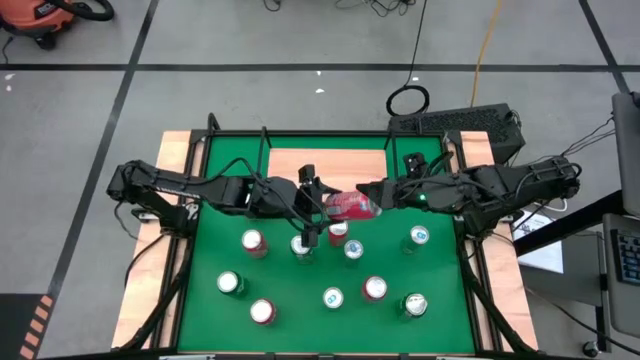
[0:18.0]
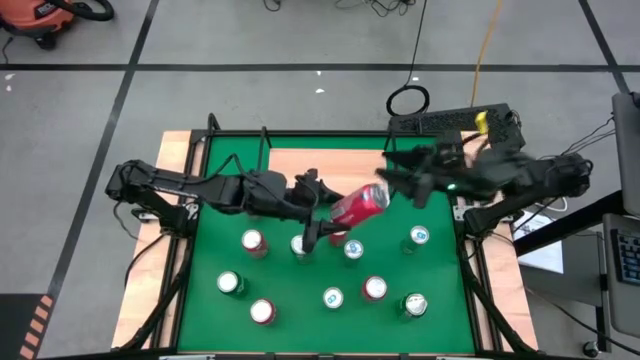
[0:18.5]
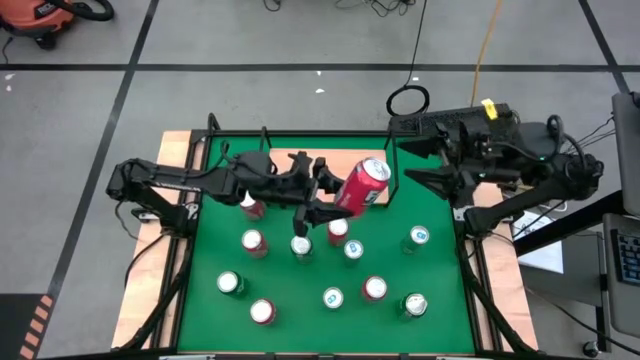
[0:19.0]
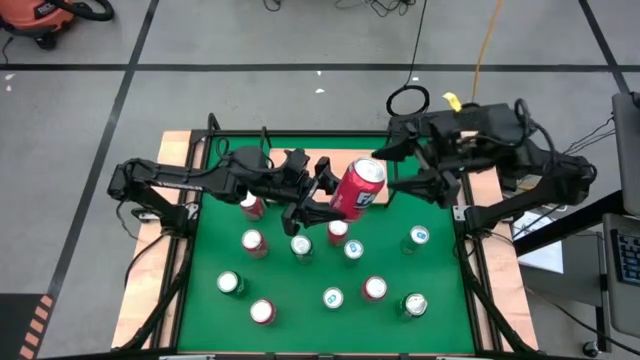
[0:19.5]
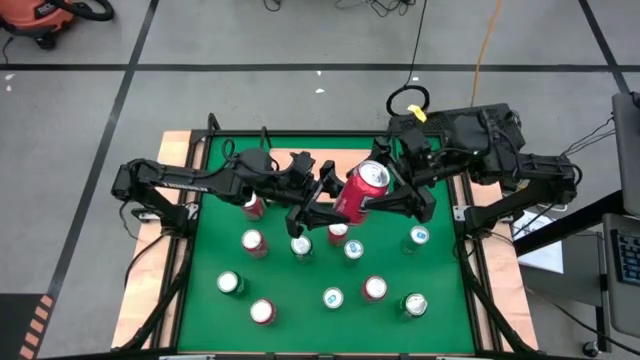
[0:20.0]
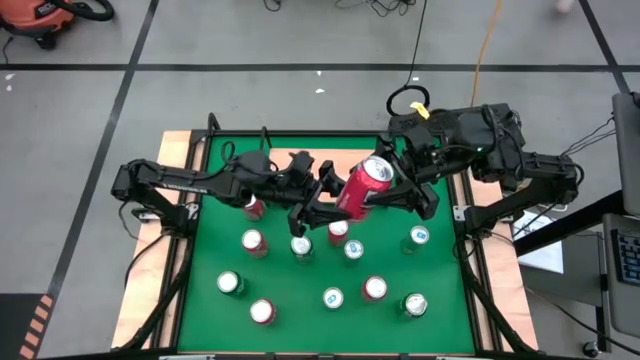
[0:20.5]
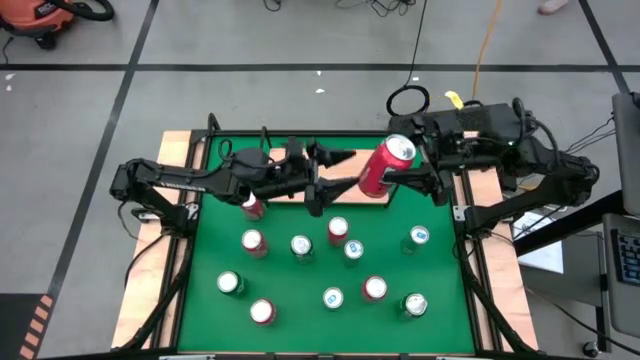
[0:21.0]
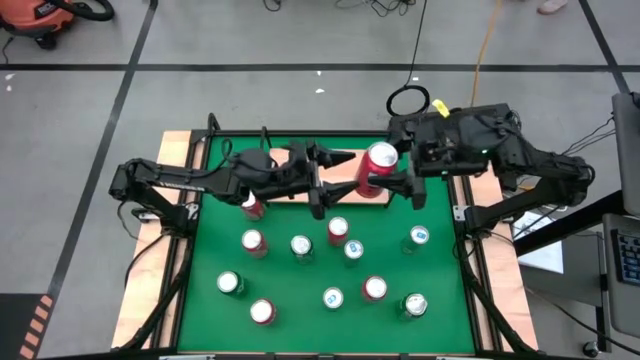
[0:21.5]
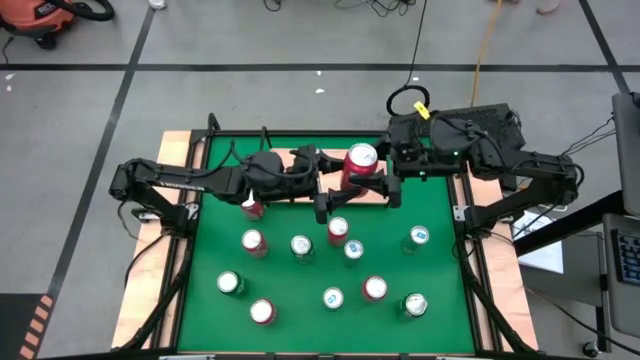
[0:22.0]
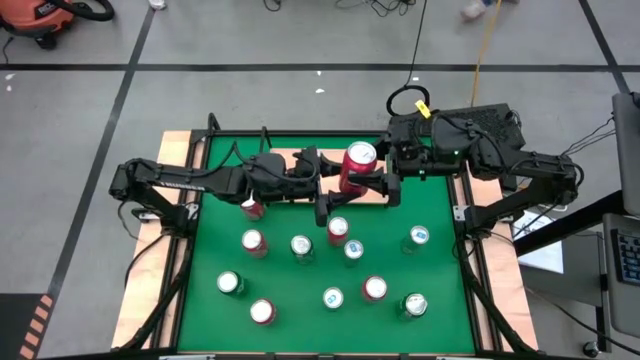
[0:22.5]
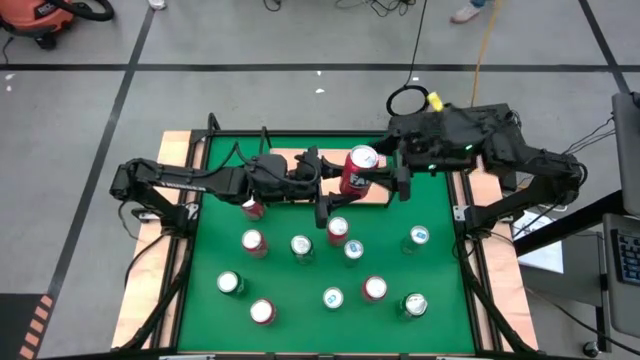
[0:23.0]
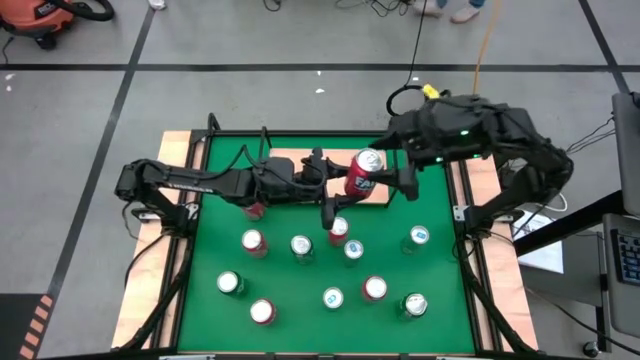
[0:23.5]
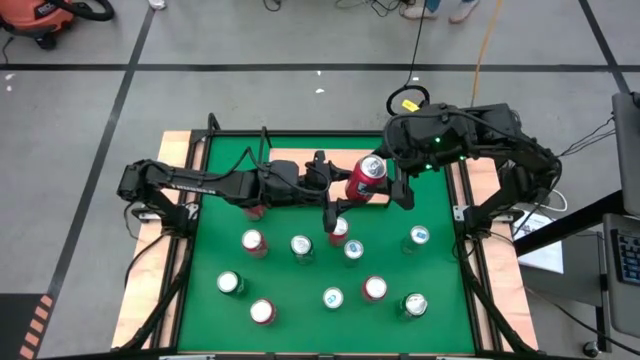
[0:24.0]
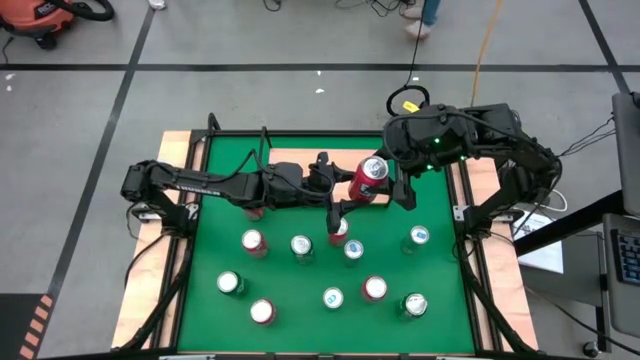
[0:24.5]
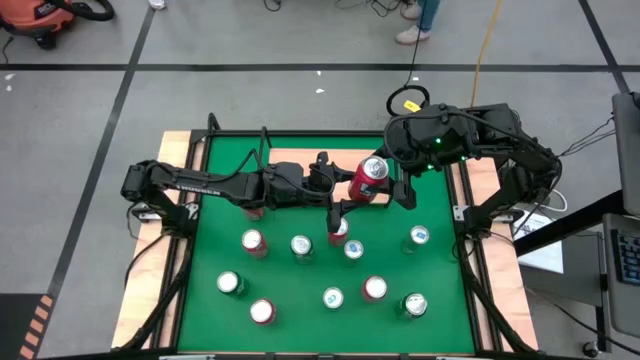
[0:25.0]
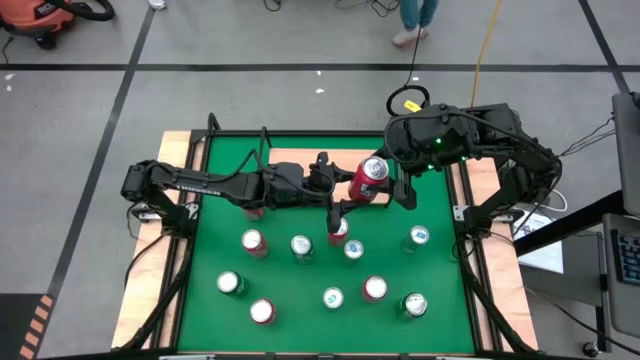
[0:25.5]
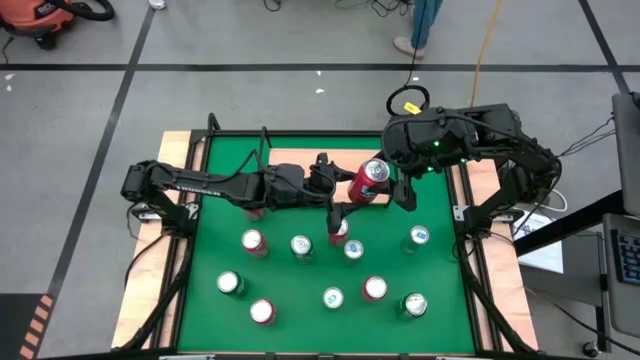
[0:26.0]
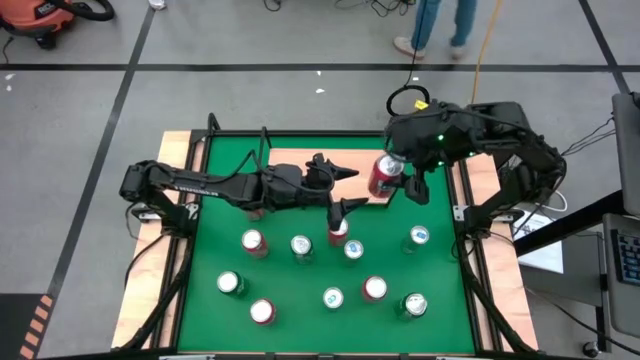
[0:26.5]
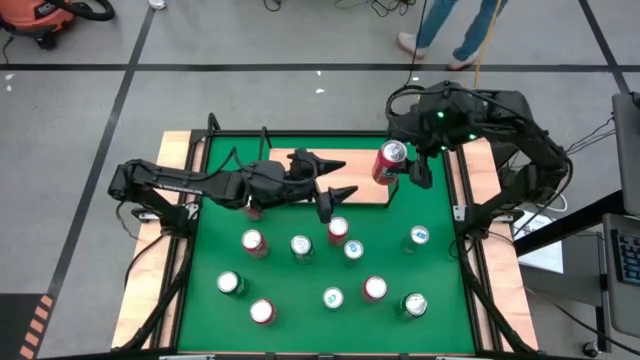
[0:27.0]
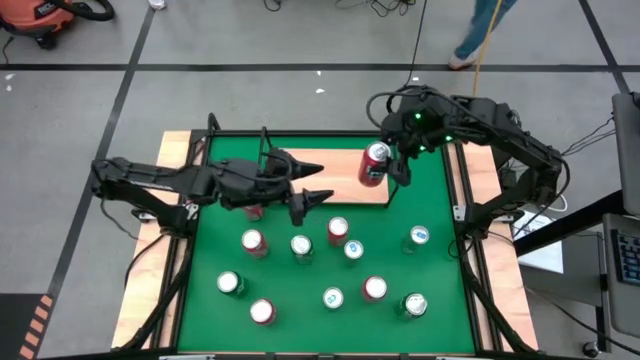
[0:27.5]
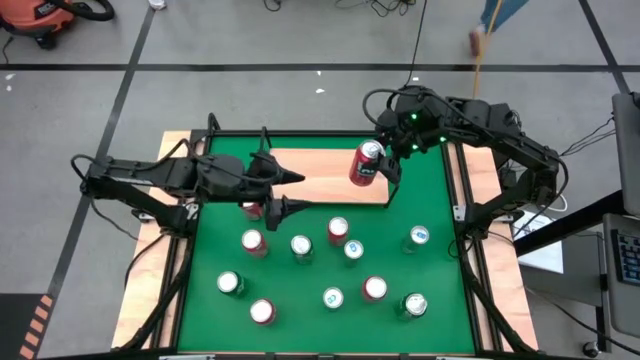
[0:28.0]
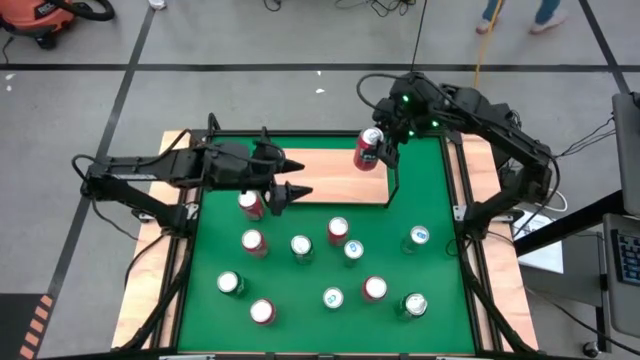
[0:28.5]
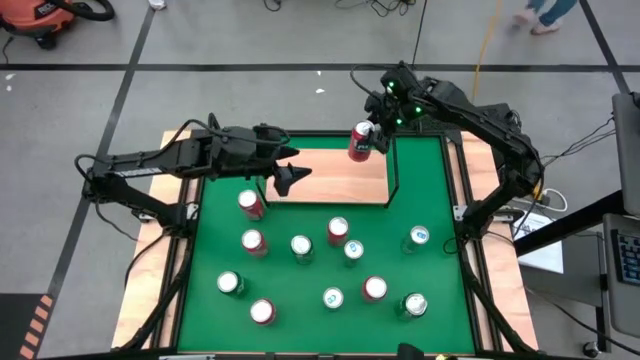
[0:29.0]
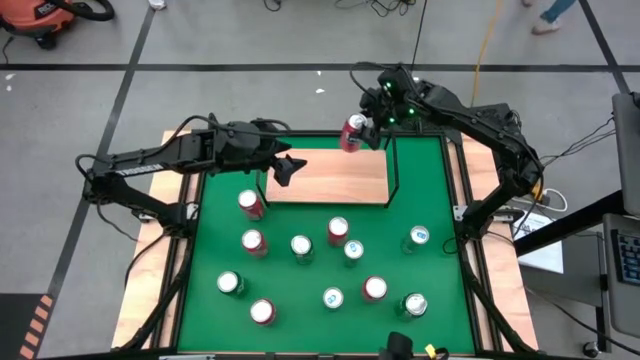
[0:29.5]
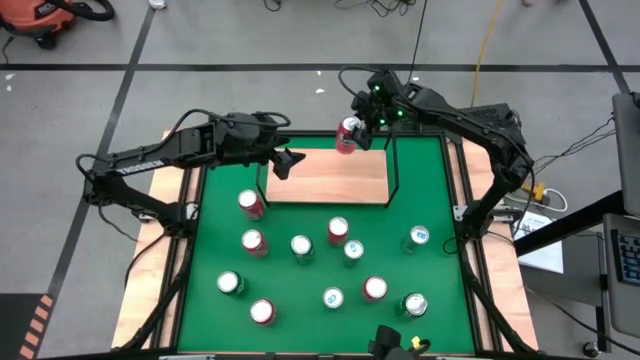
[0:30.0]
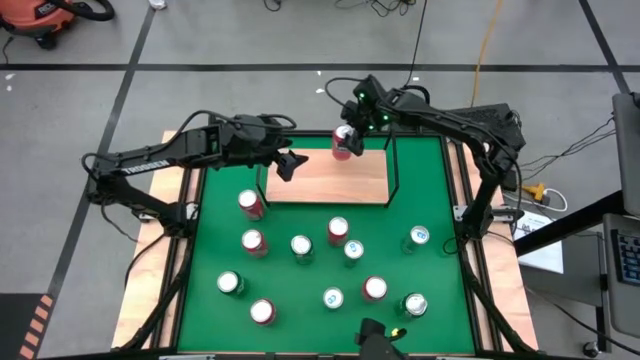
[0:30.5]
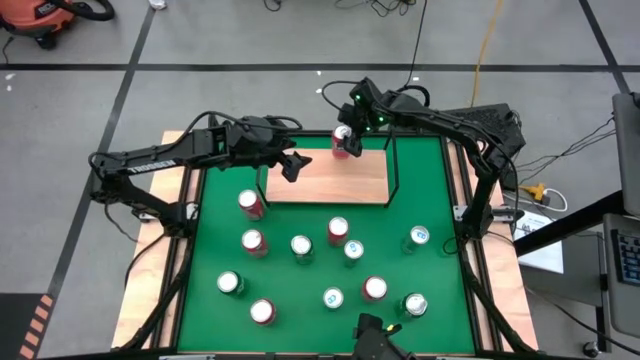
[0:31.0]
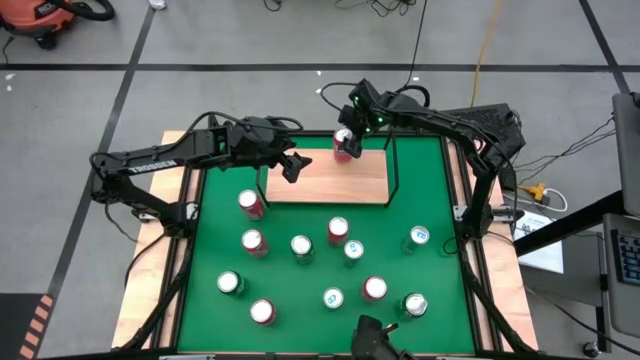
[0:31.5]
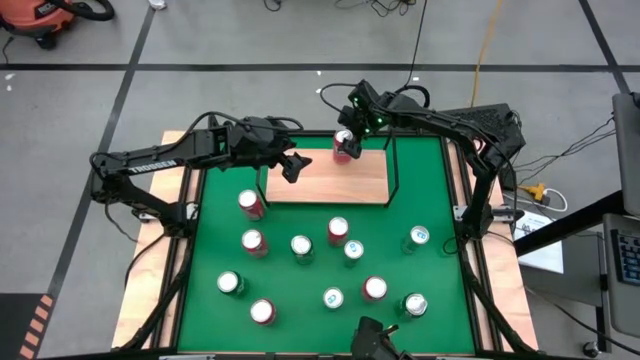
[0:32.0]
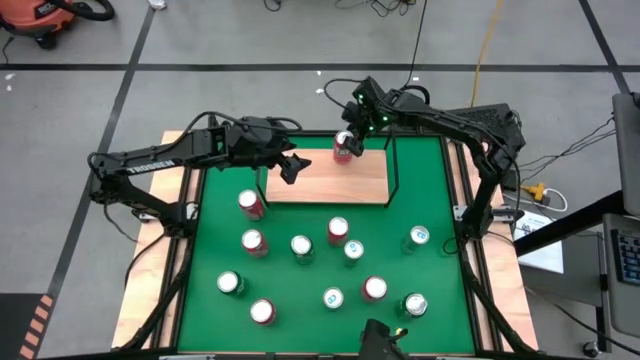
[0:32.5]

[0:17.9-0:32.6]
Task: Place canned beverage on shelf
Put the red soda can on the shelf

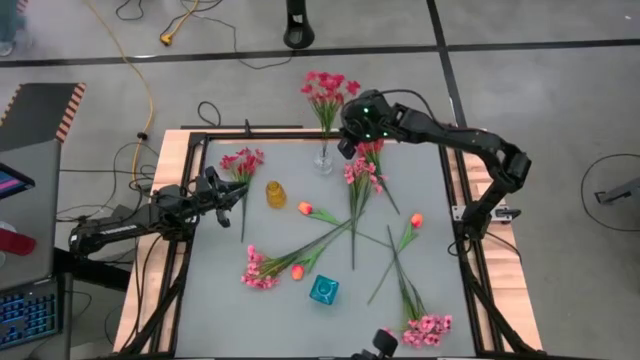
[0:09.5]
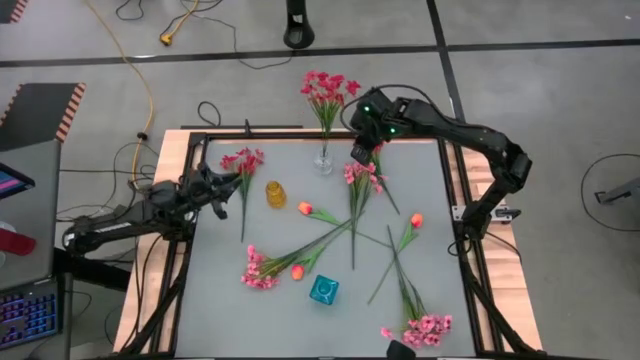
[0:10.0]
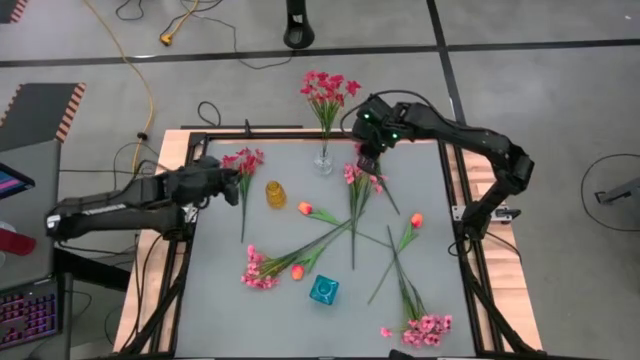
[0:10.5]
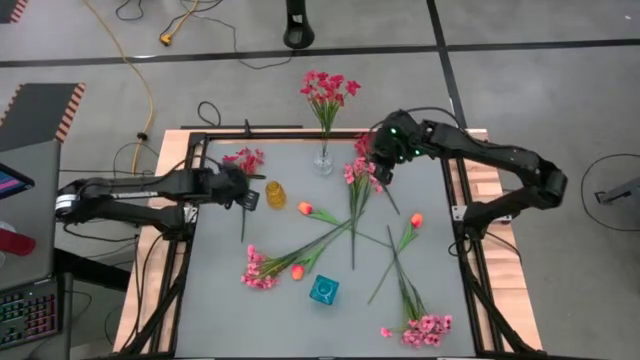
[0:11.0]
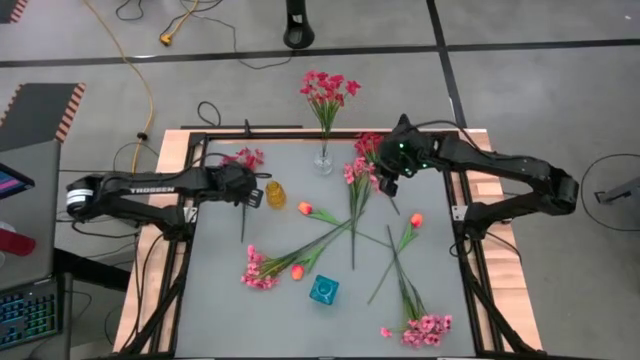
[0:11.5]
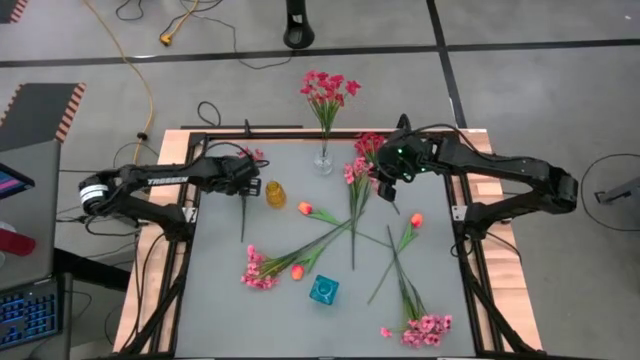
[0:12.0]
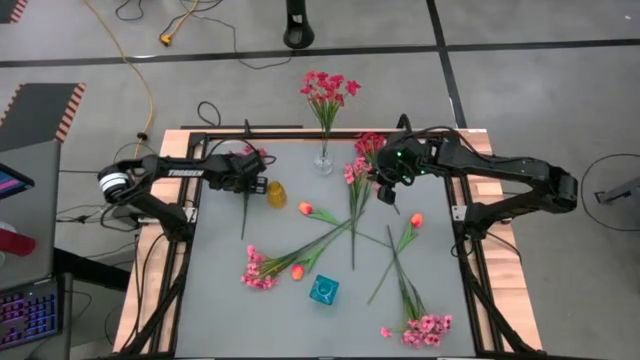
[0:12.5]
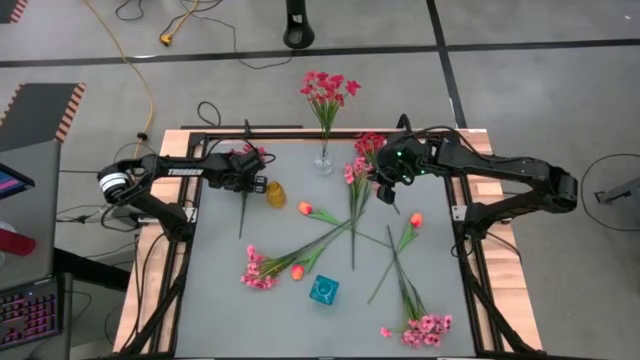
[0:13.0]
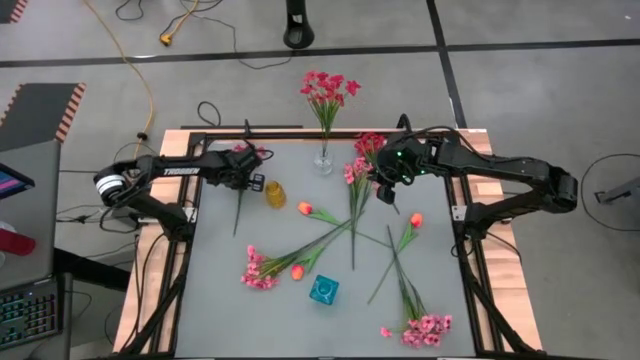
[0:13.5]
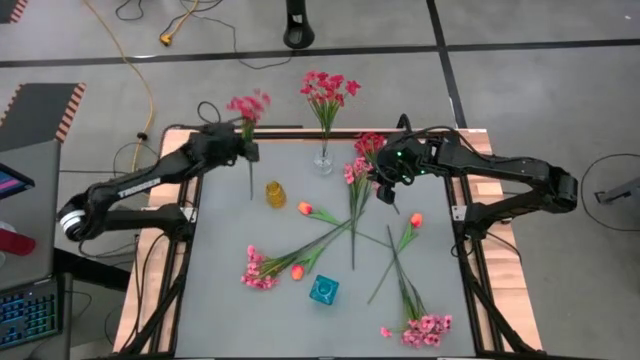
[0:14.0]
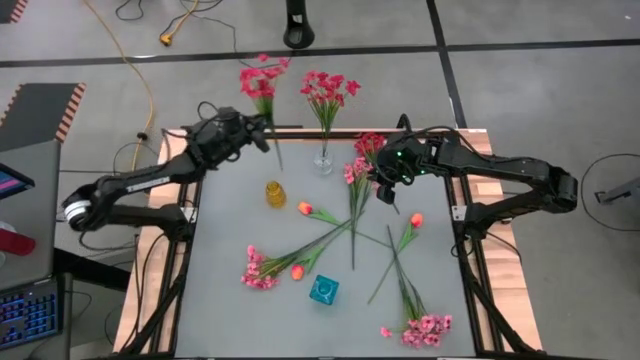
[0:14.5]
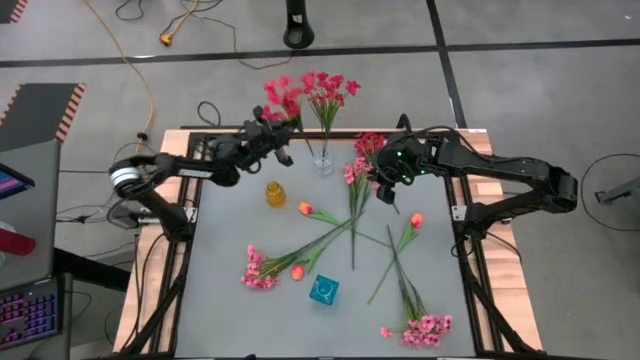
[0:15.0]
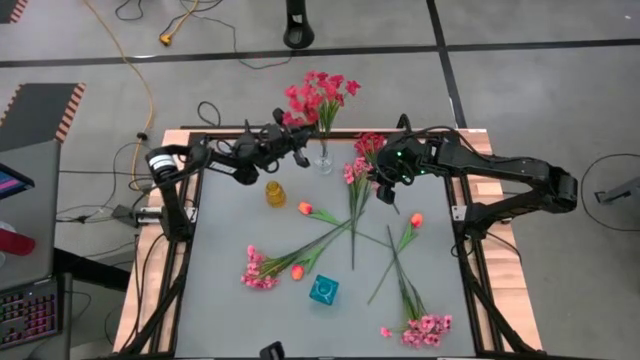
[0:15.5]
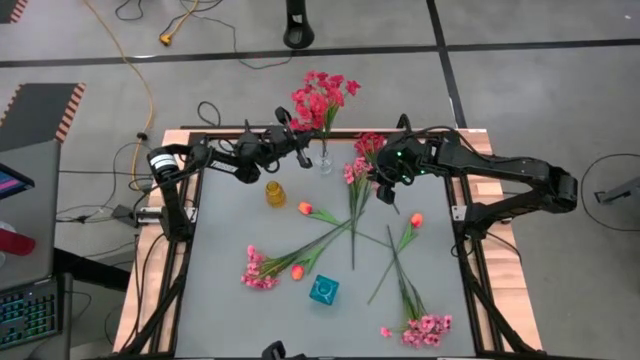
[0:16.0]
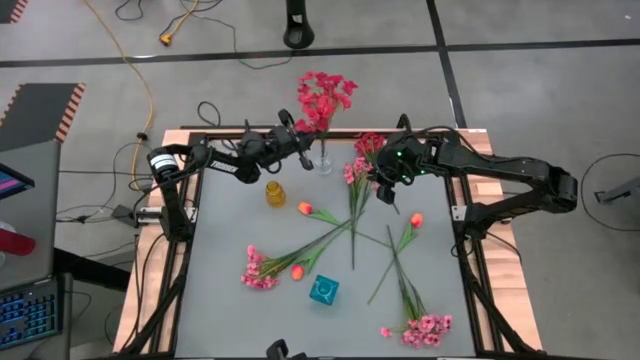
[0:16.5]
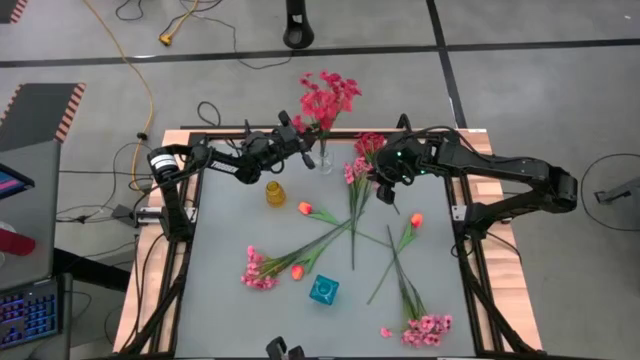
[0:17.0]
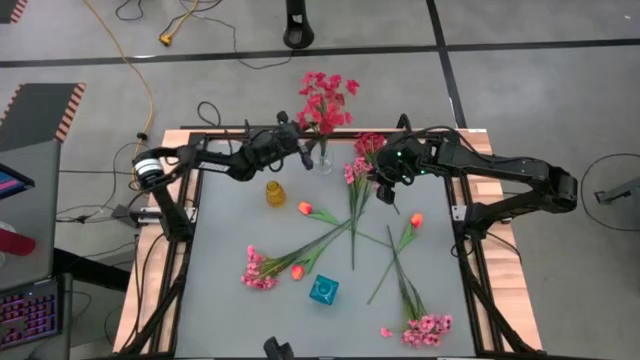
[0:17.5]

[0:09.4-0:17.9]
Task: Sort flowers into vase by color
Put the left red flowers into the transparent vase
